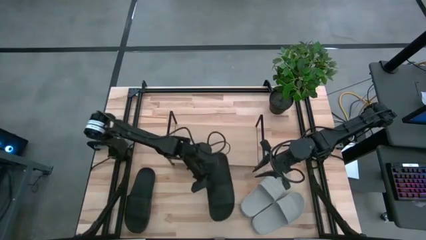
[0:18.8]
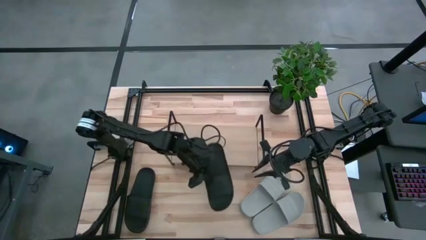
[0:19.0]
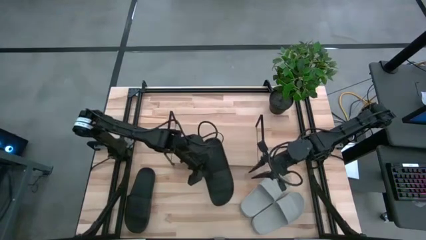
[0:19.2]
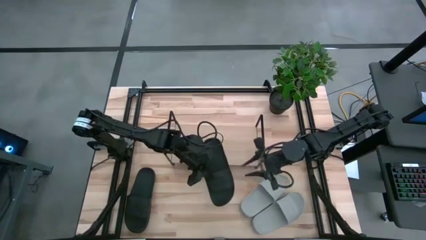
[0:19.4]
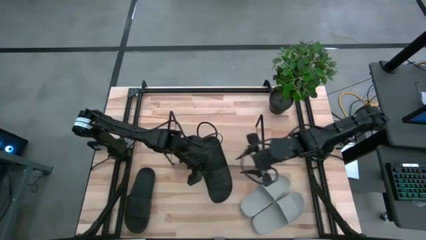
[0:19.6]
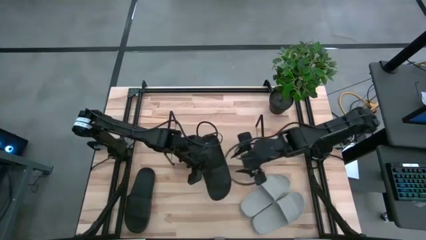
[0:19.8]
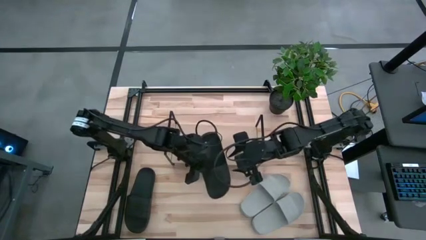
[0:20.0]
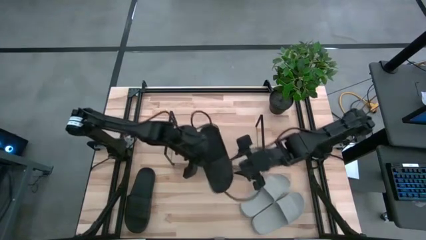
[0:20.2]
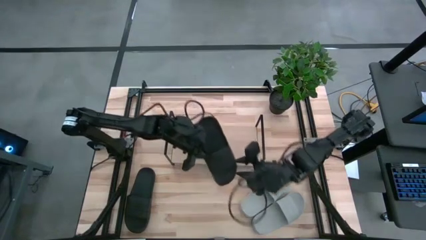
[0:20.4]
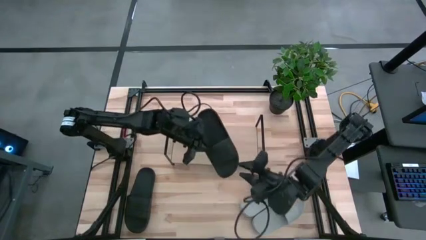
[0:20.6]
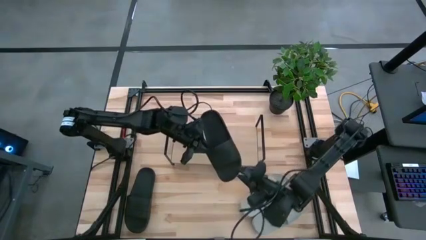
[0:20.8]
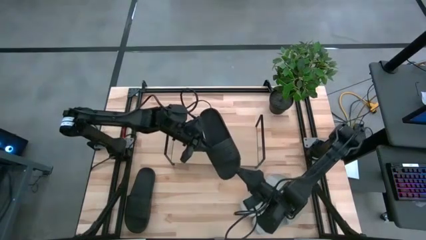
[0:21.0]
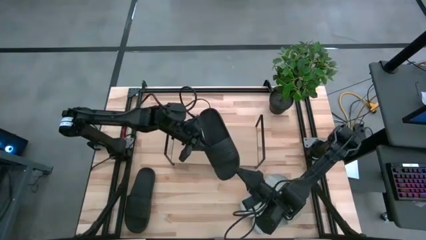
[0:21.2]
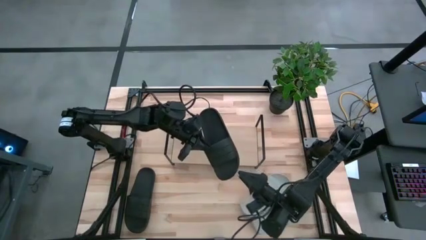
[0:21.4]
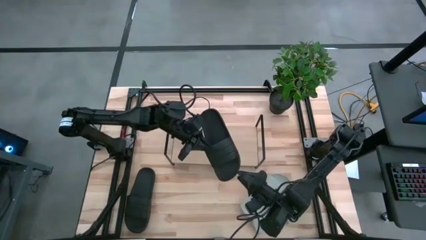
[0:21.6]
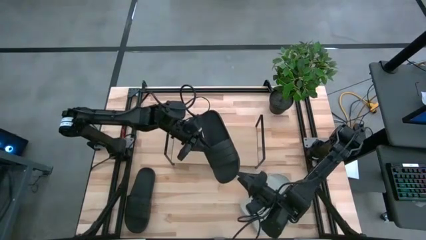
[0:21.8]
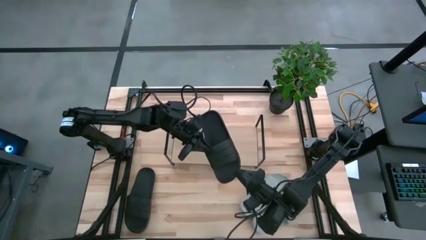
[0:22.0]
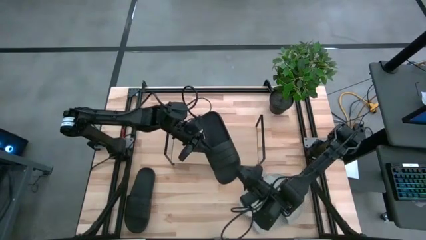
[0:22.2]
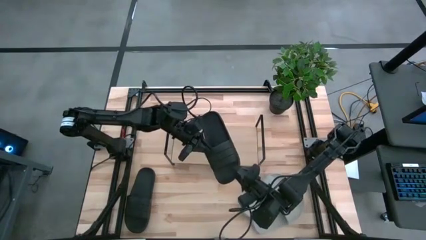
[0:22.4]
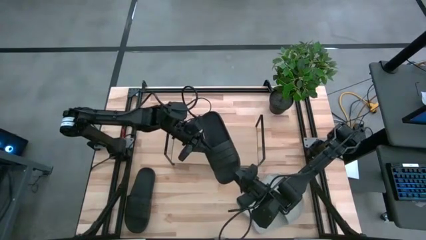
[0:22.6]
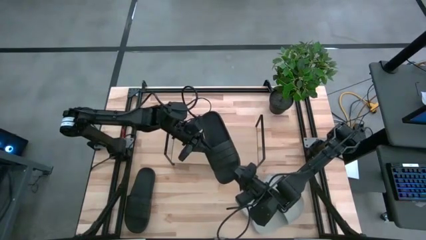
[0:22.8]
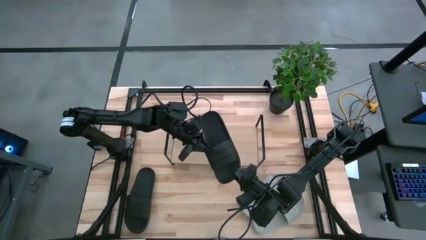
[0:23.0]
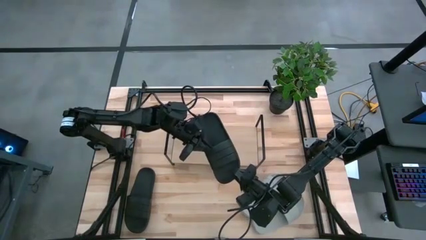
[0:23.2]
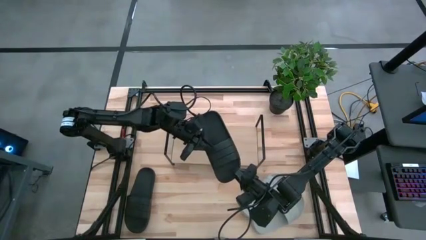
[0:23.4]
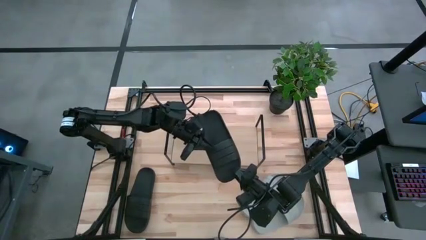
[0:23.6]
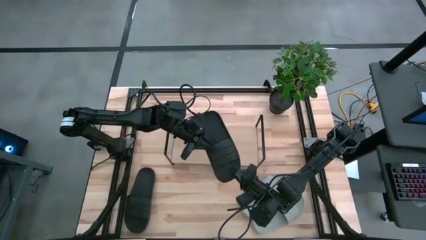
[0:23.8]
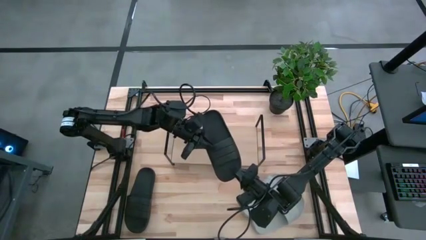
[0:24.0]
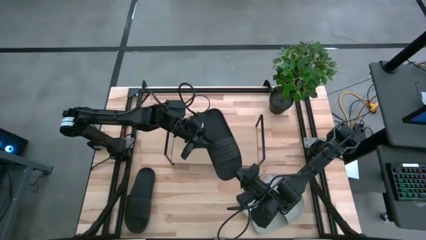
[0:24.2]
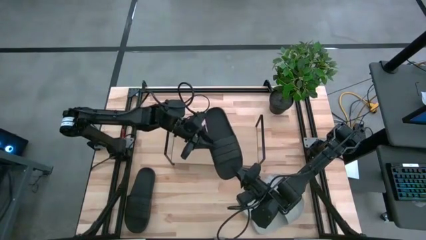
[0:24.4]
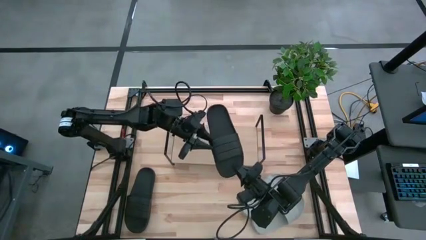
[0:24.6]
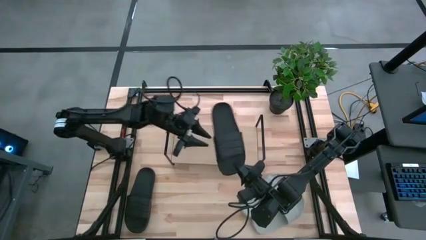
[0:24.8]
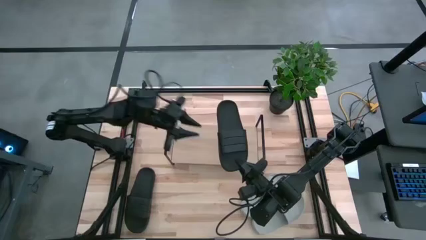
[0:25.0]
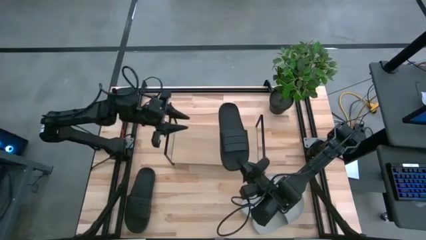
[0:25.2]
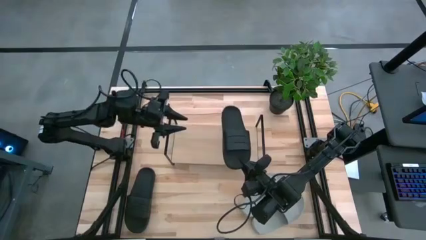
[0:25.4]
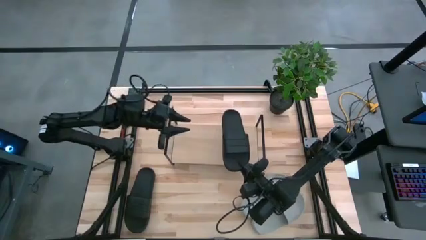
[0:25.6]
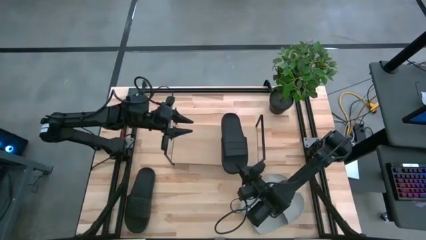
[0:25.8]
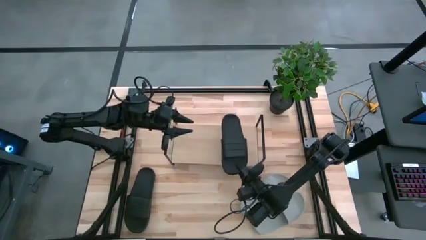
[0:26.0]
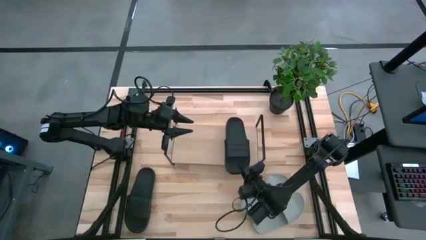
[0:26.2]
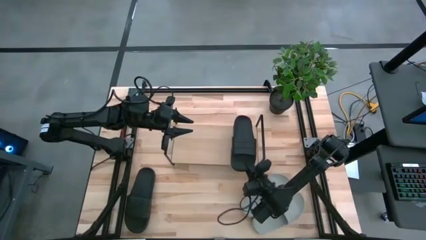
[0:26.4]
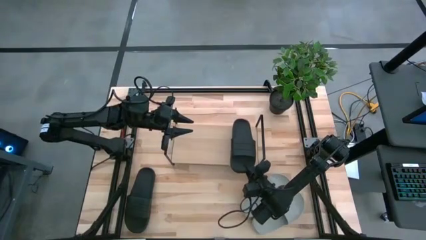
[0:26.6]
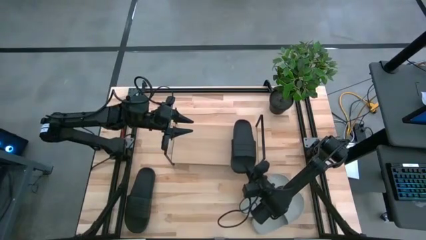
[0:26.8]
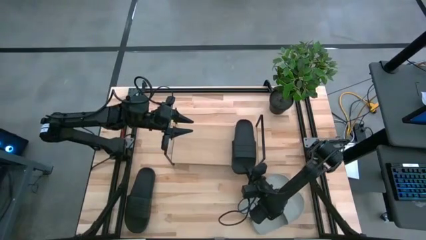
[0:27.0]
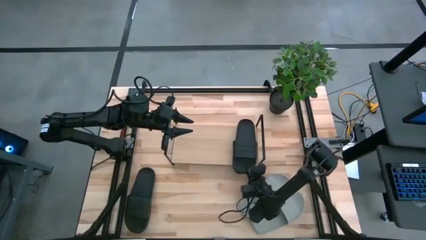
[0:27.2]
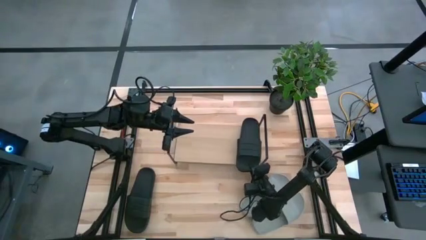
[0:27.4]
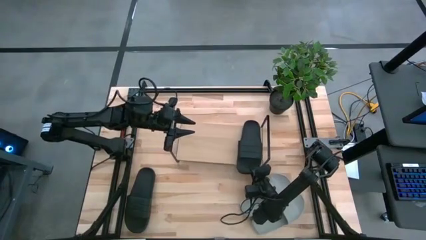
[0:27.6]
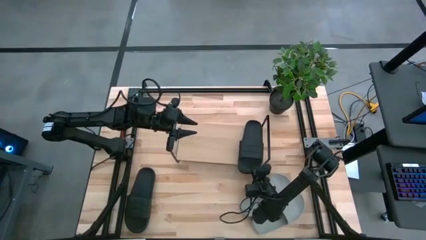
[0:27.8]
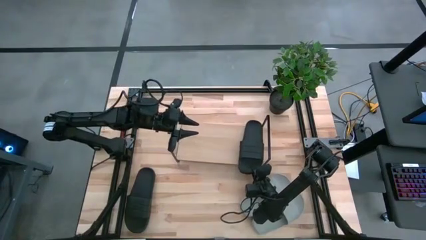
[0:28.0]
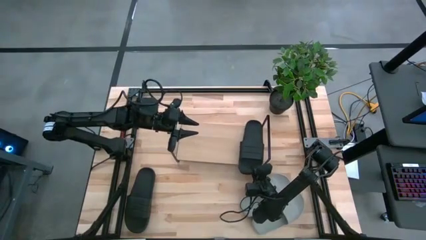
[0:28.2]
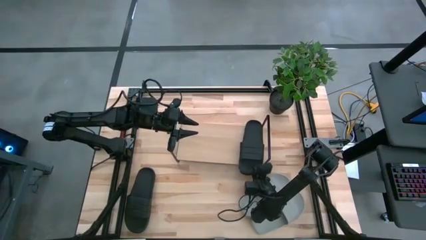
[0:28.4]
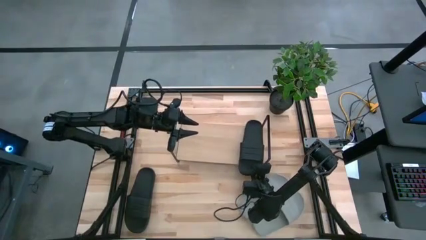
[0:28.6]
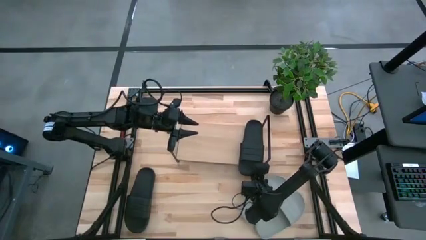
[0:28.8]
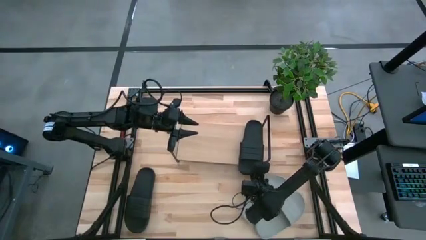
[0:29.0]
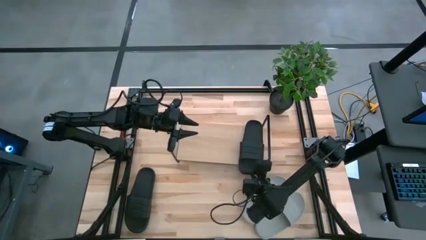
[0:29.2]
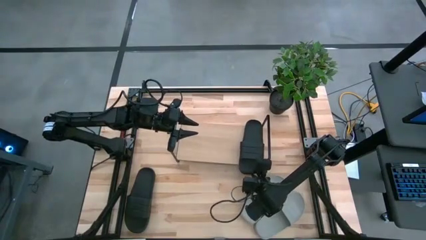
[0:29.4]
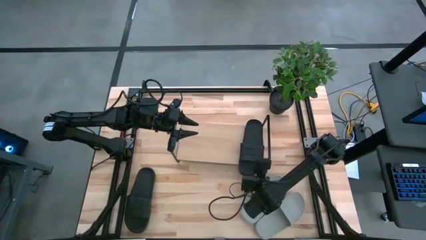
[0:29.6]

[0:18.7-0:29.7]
Task: Pick and place slides into the shelf
Put the right black slides on the shelf
